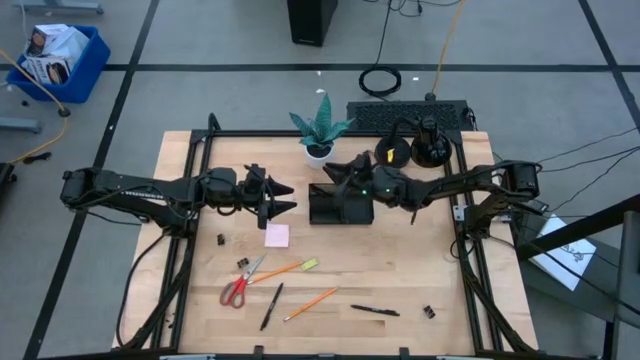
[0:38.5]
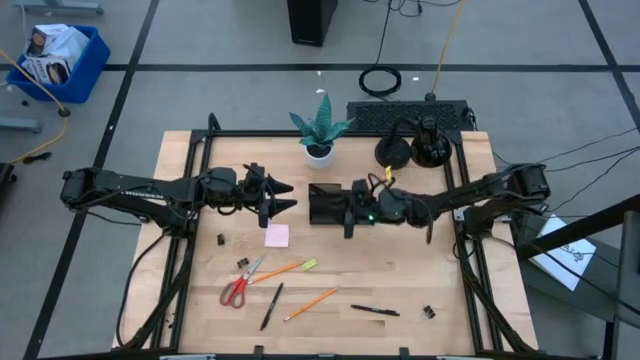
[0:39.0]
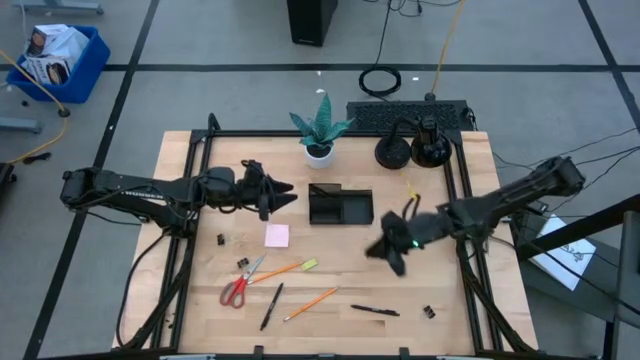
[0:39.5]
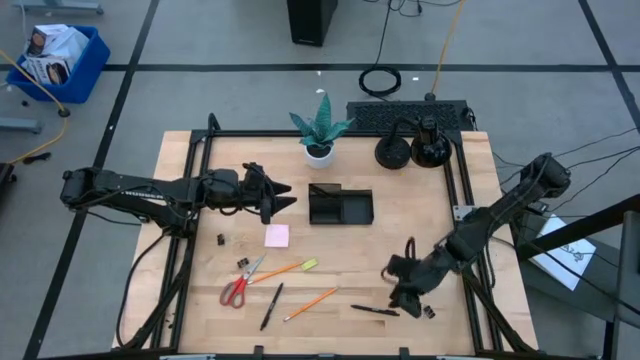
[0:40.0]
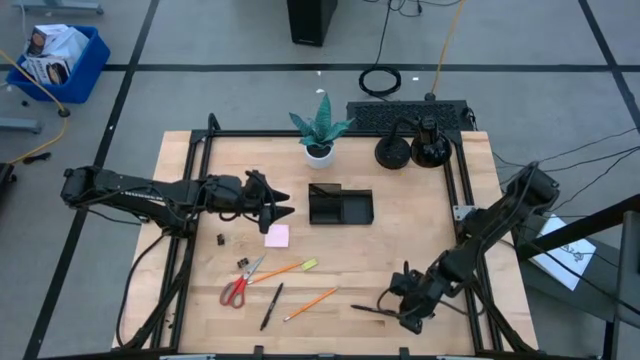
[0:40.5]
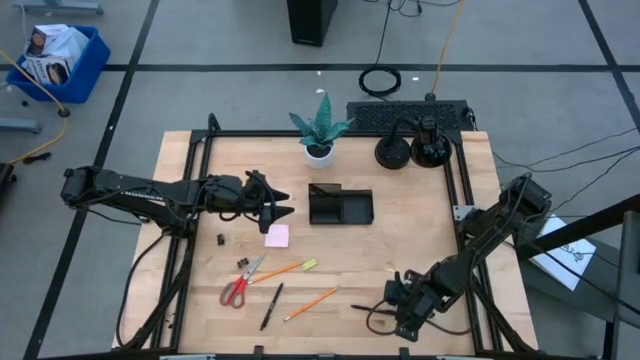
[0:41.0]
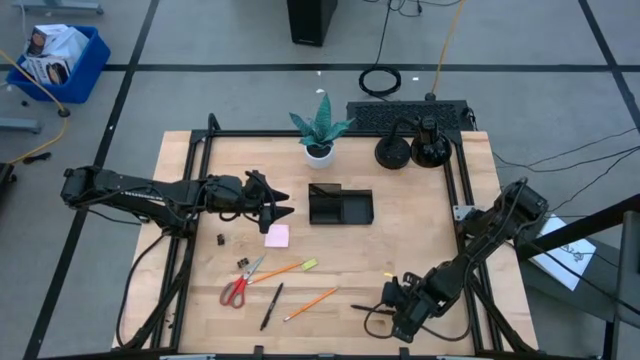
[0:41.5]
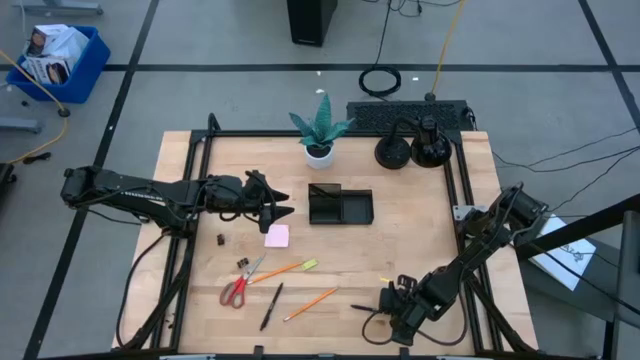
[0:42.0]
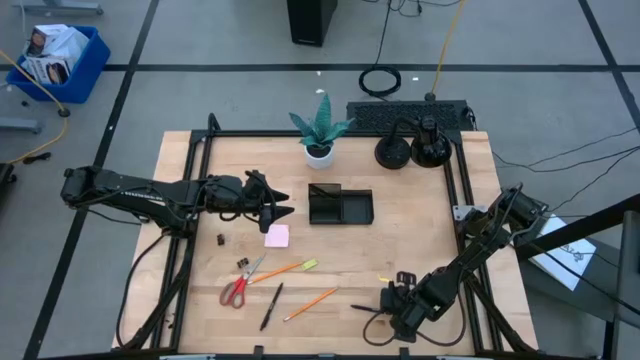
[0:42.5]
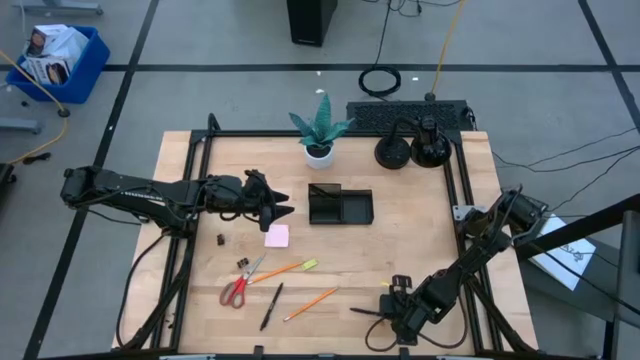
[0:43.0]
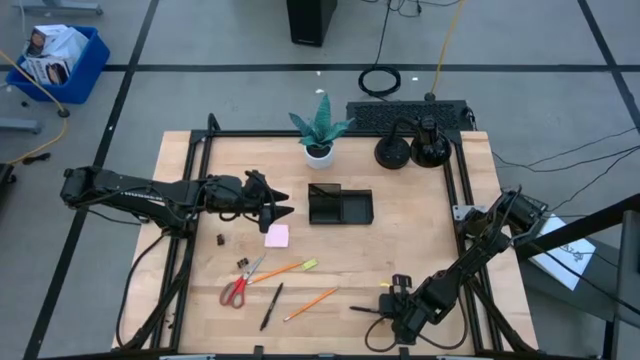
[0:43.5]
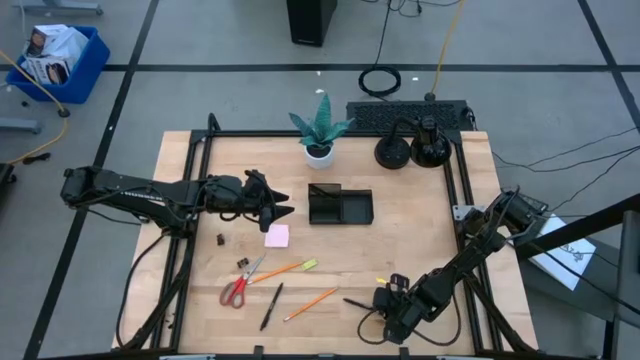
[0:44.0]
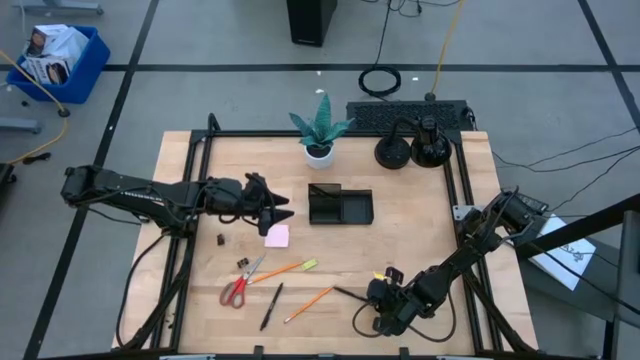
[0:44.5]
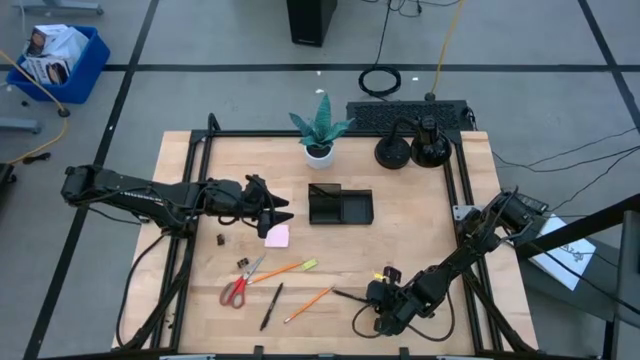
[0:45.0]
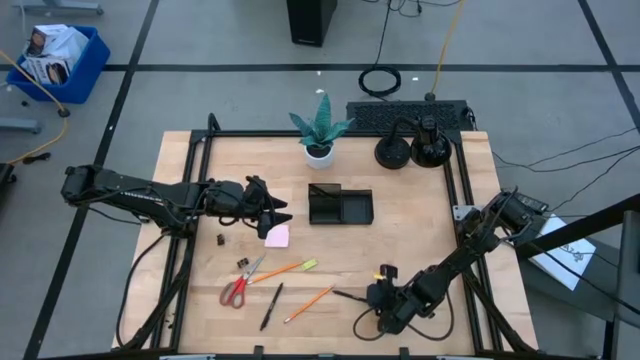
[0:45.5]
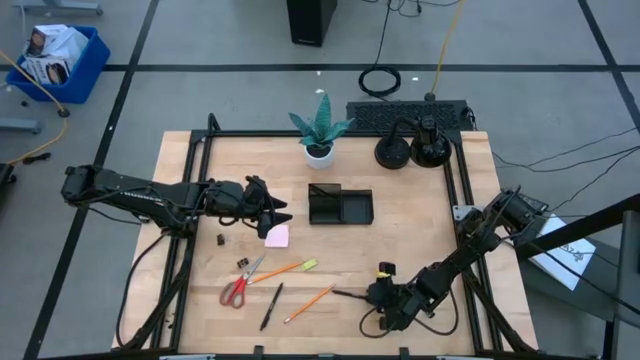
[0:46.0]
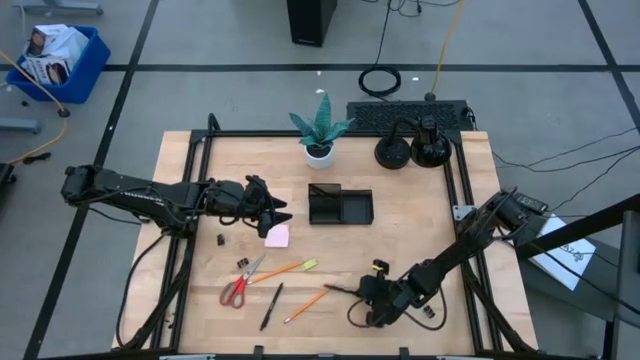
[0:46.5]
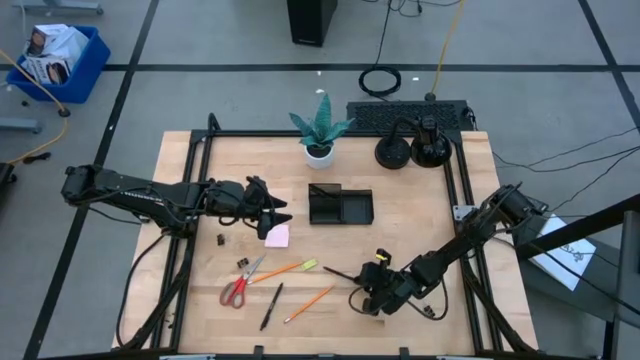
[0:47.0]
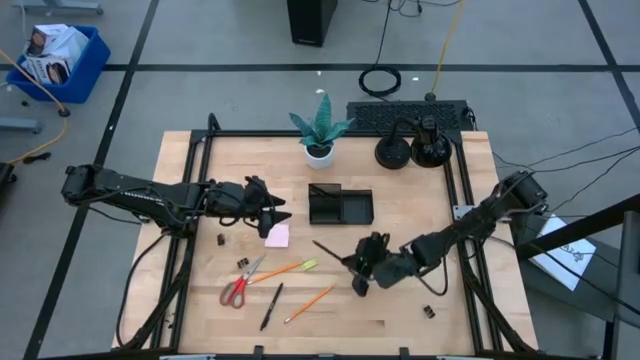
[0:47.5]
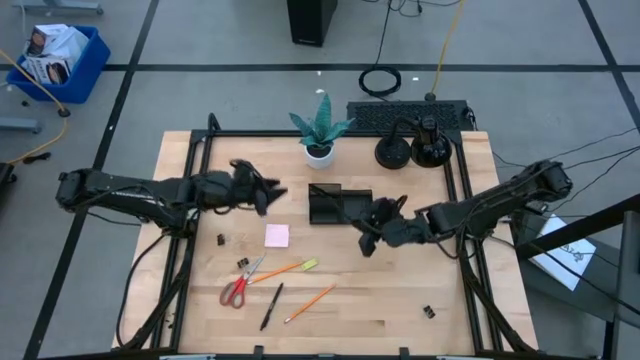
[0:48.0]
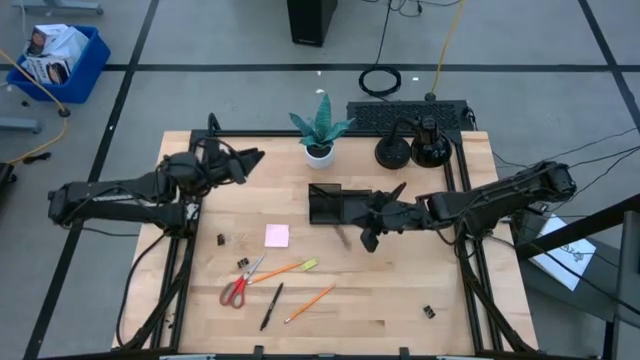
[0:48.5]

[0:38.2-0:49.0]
Task: Pick and place office supplies into organizer
Put the black pen into the black desk organizer

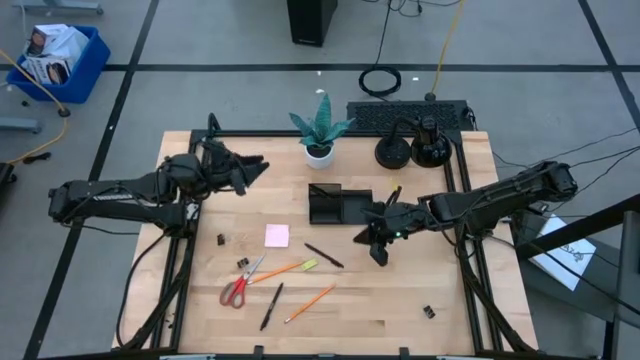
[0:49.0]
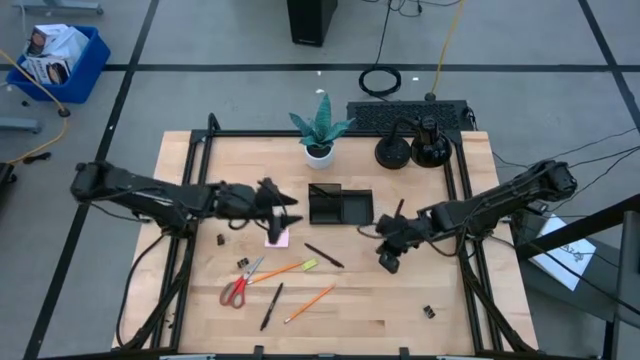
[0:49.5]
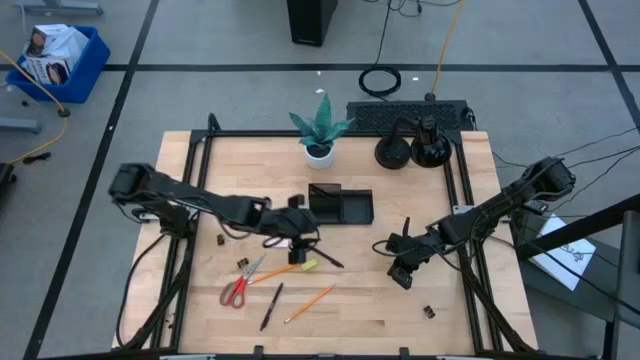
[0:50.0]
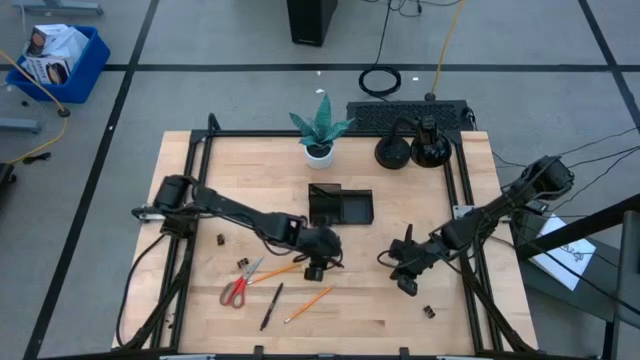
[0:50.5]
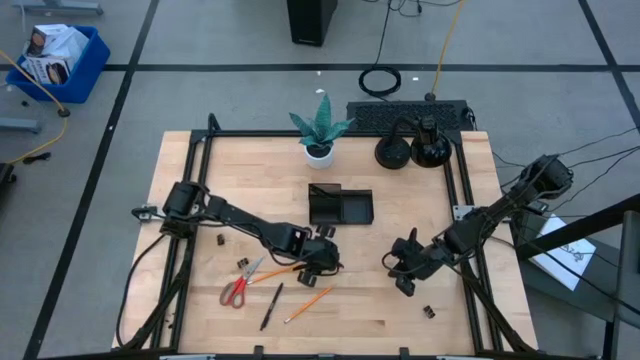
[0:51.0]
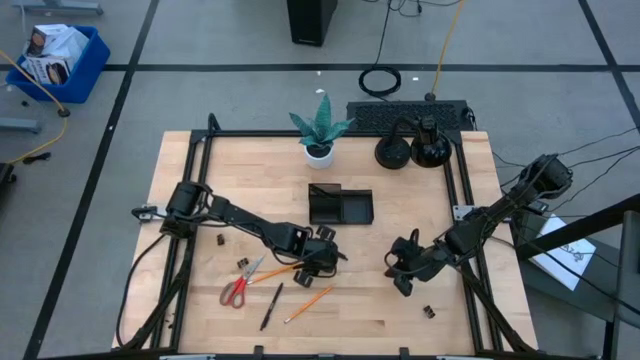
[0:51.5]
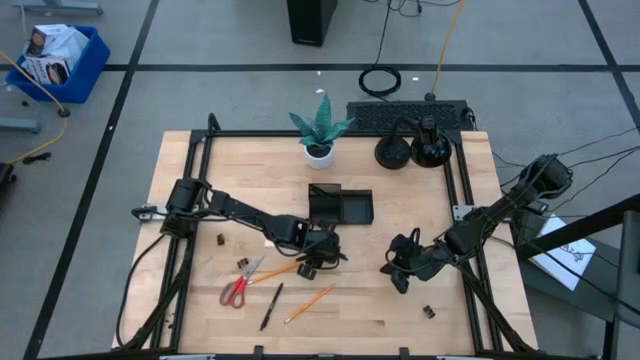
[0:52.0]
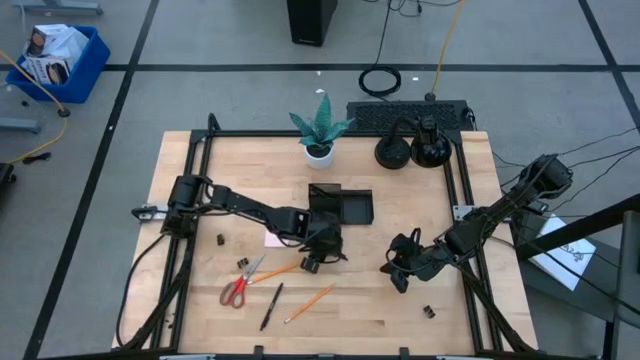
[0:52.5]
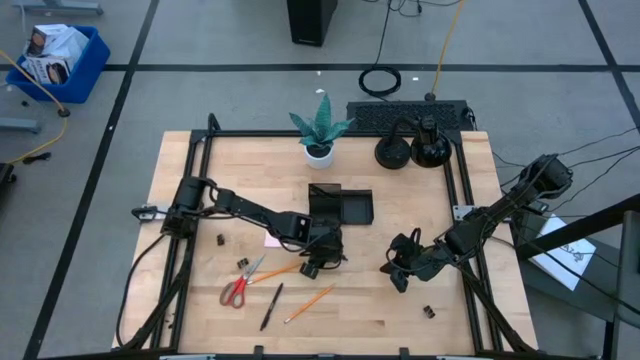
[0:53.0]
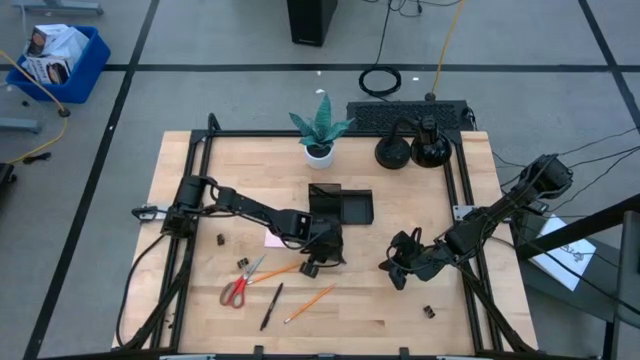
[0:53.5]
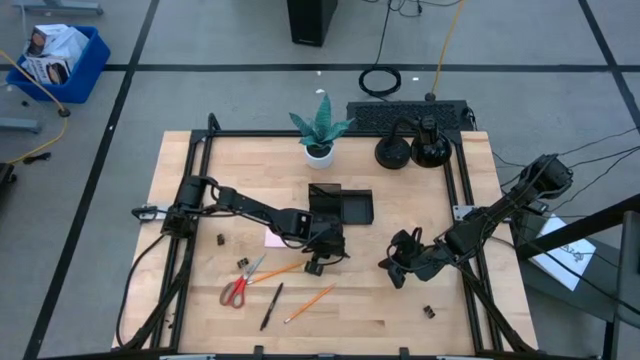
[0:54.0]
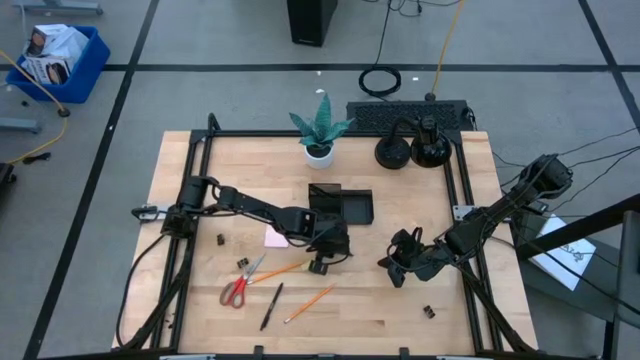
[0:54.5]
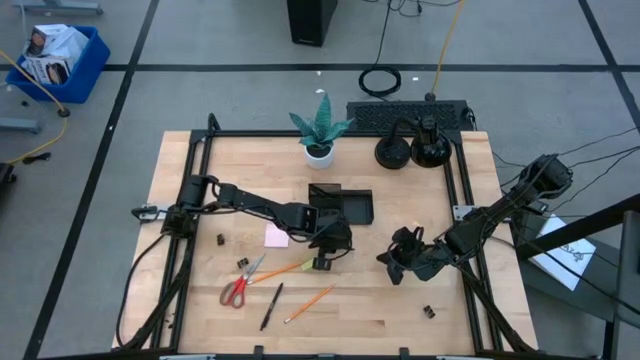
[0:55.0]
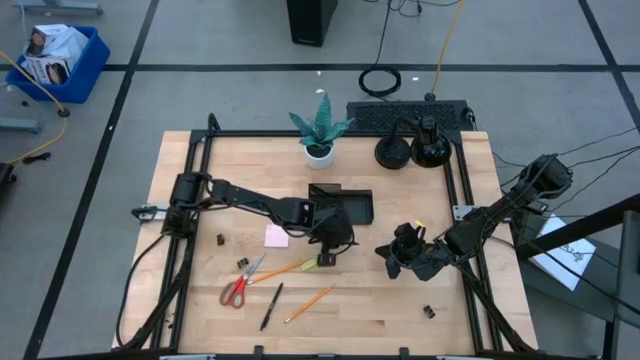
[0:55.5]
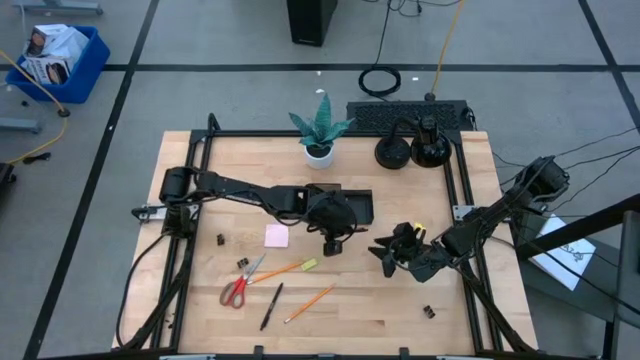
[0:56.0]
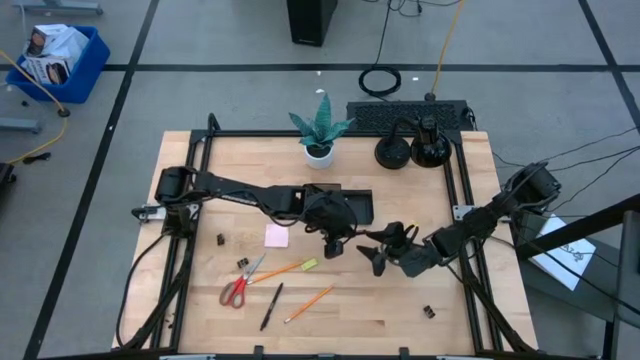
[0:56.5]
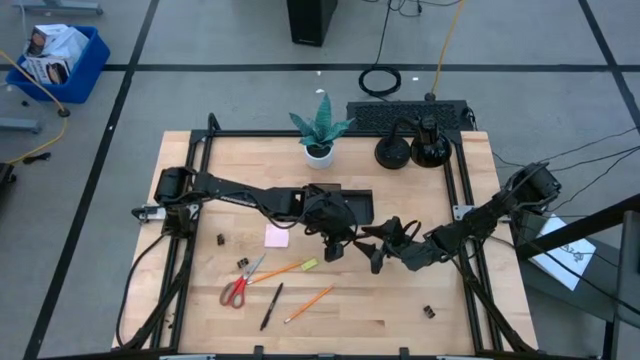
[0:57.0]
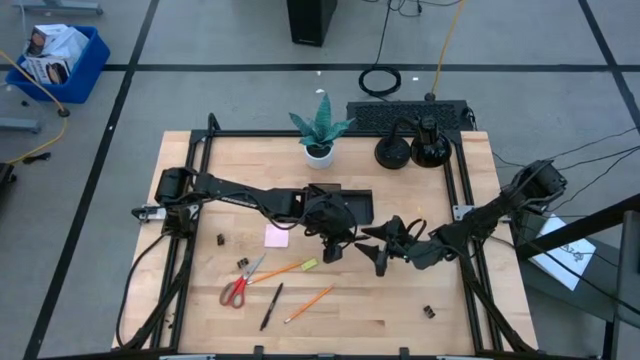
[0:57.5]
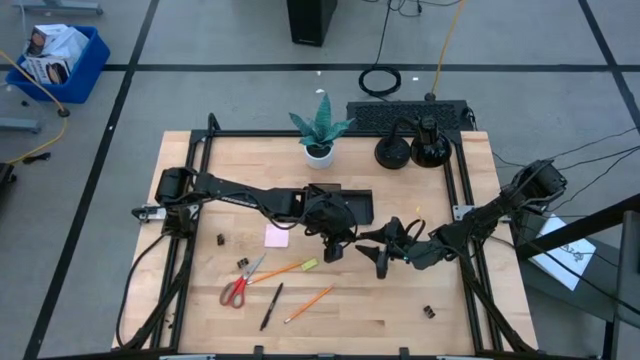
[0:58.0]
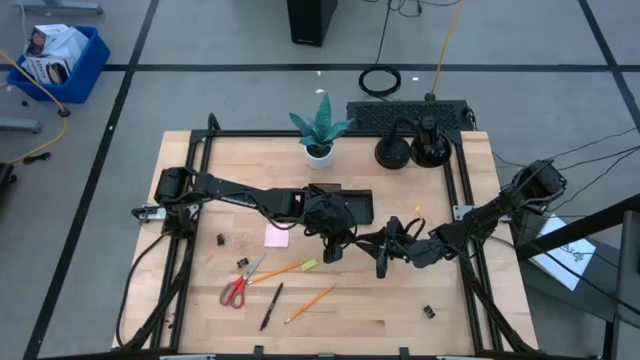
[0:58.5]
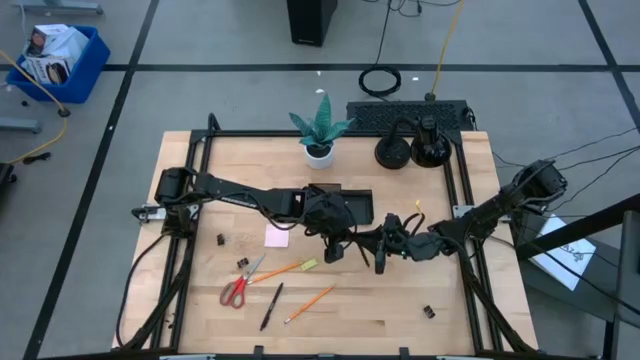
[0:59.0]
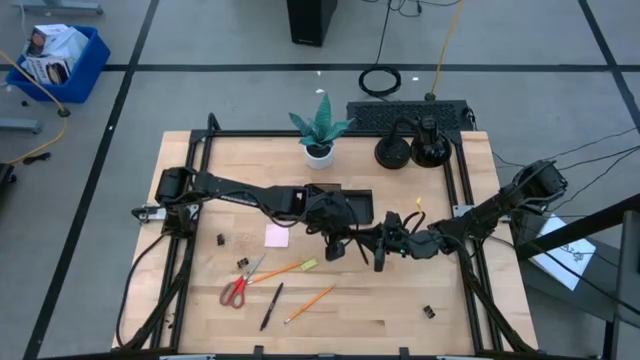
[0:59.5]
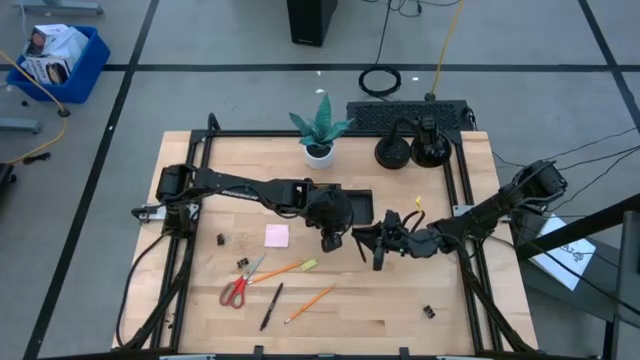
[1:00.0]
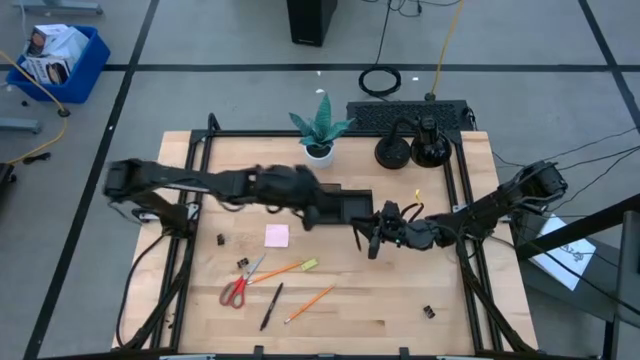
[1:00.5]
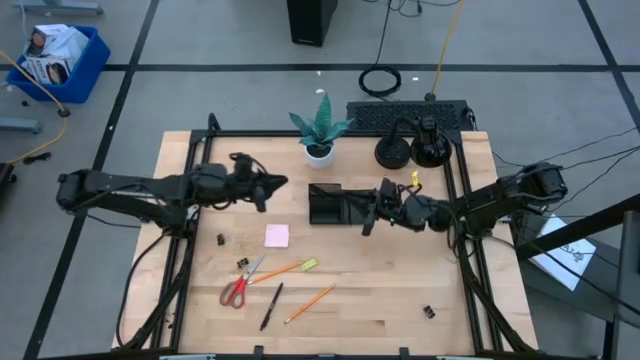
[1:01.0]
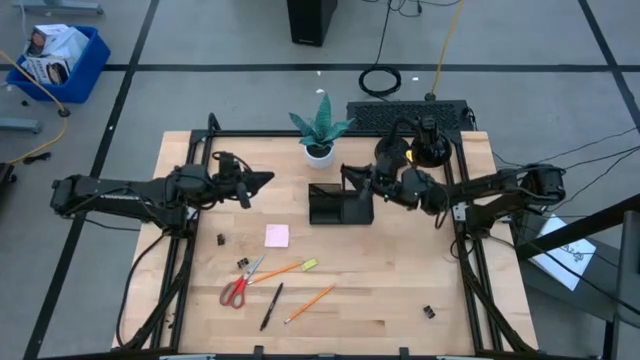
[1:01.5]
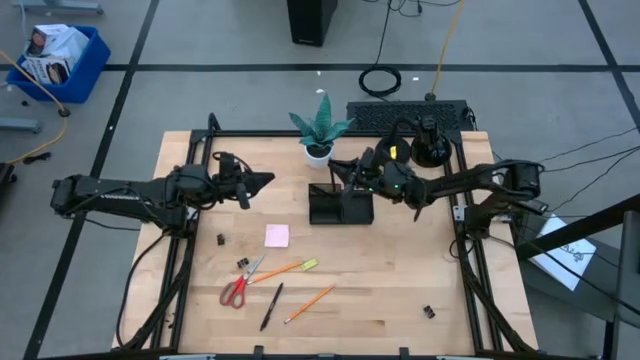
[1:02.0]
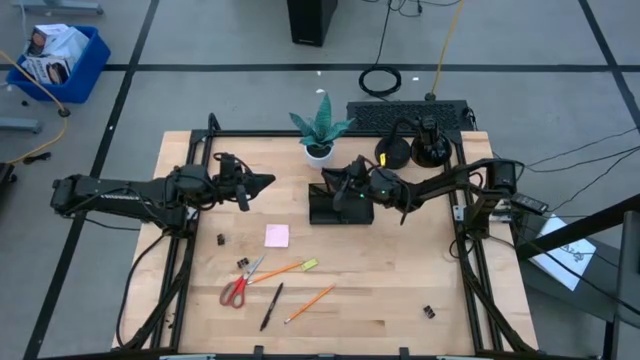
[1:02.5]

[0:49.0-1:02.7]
Put the black pen into the black desk organizer
